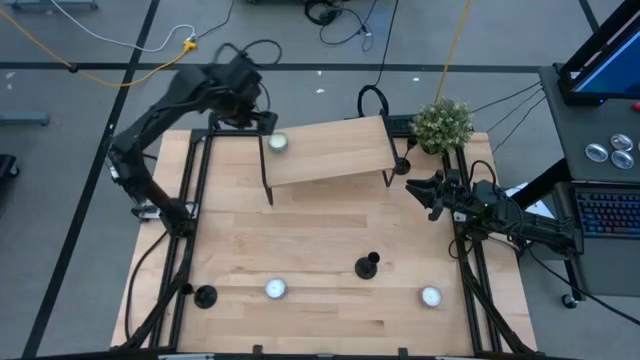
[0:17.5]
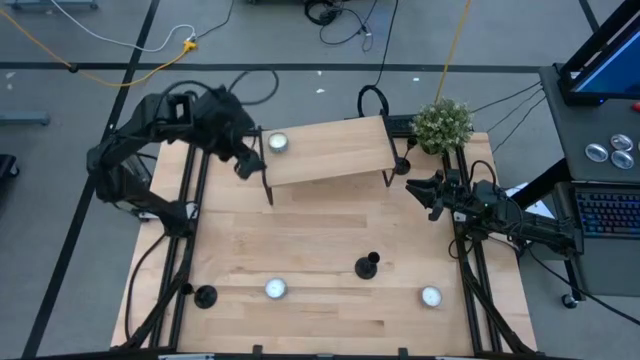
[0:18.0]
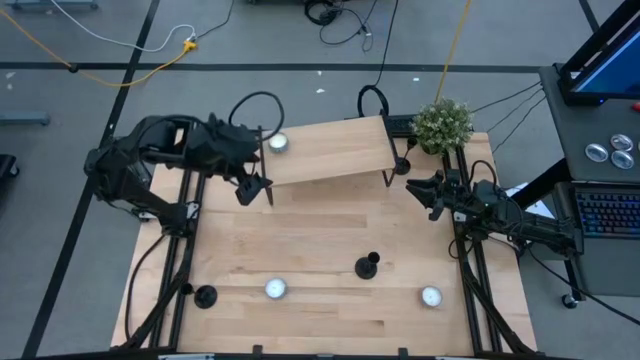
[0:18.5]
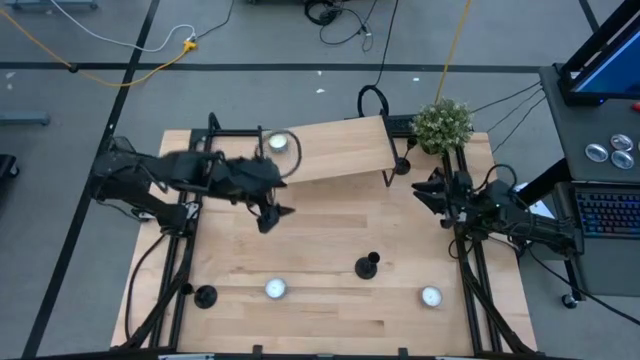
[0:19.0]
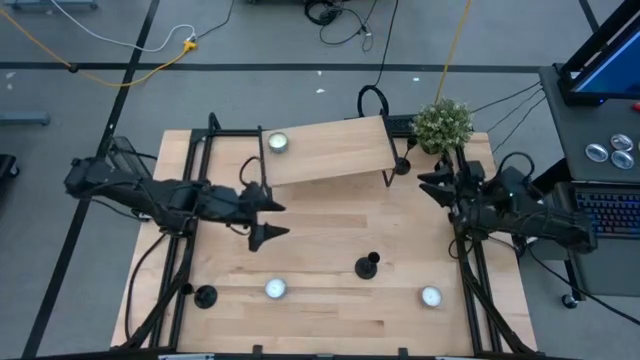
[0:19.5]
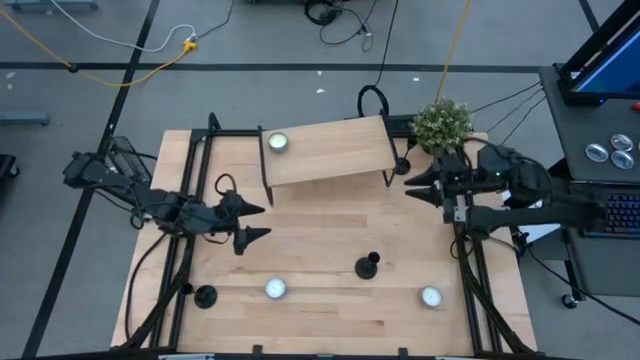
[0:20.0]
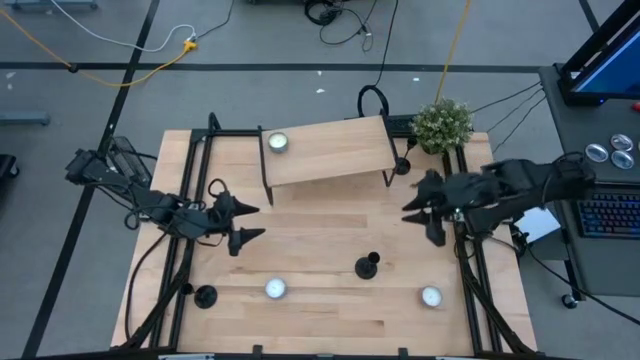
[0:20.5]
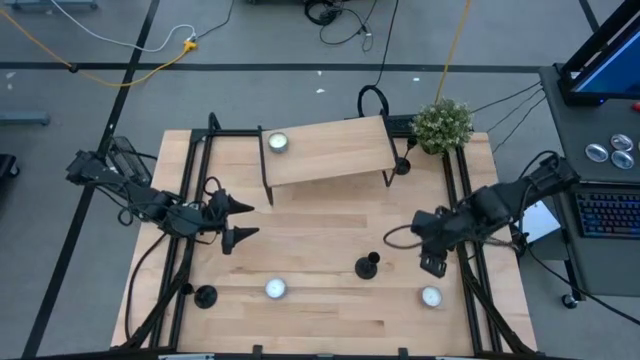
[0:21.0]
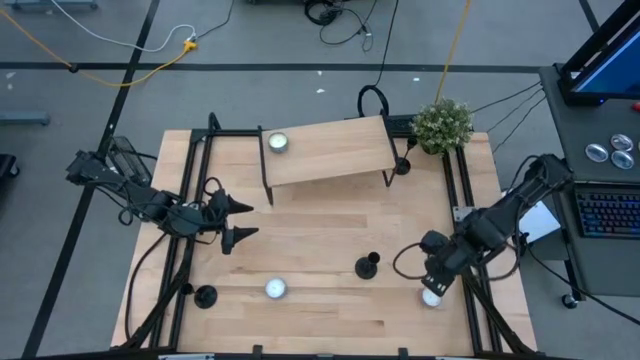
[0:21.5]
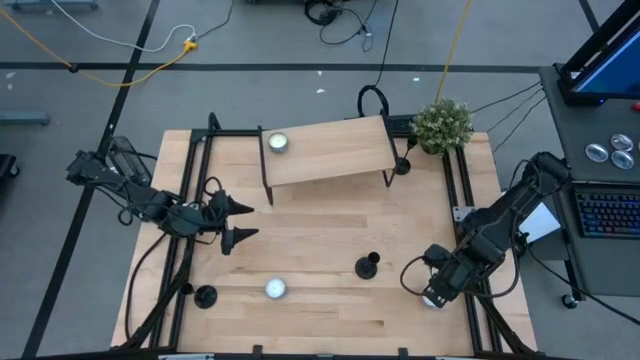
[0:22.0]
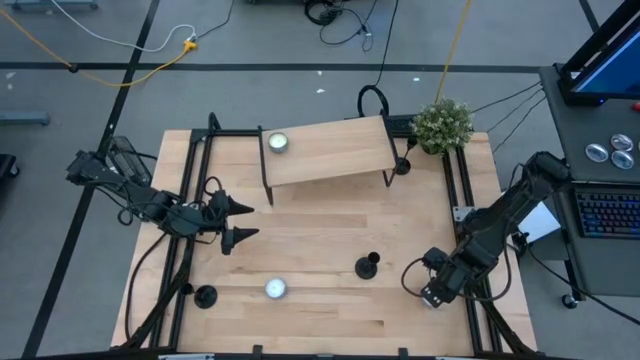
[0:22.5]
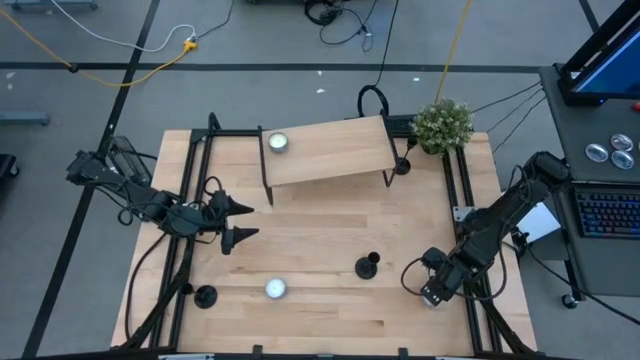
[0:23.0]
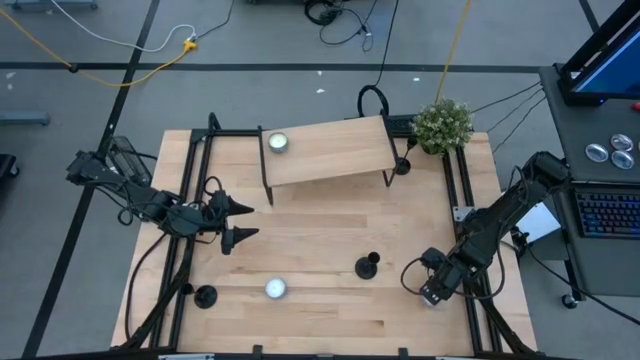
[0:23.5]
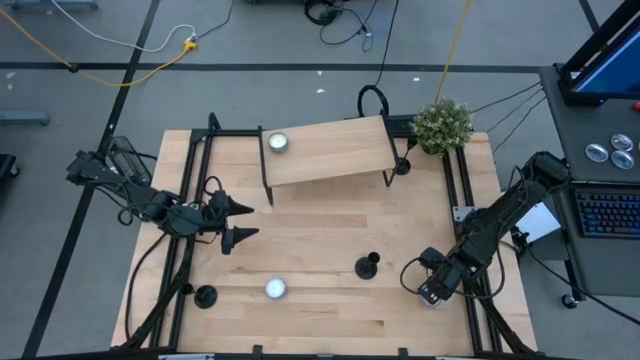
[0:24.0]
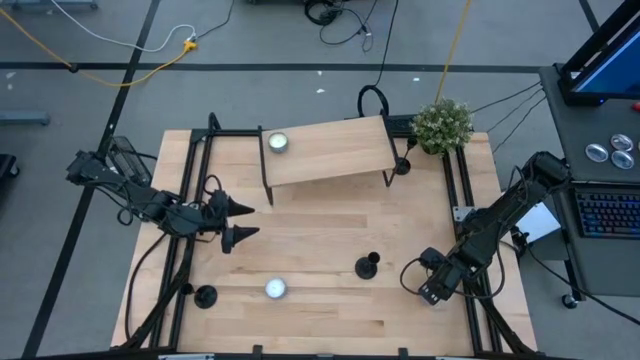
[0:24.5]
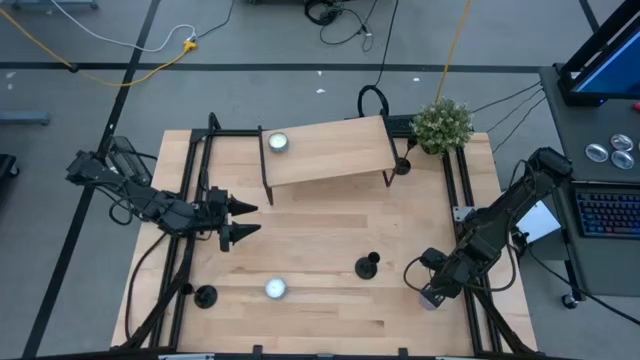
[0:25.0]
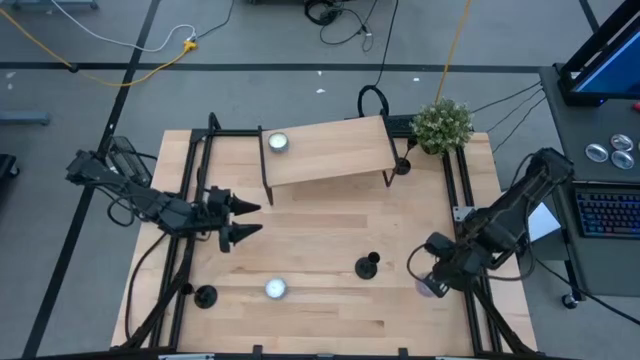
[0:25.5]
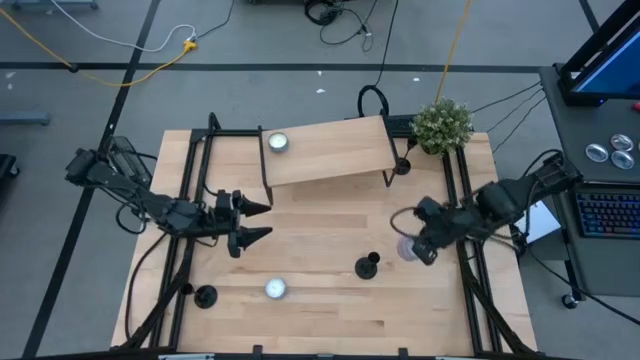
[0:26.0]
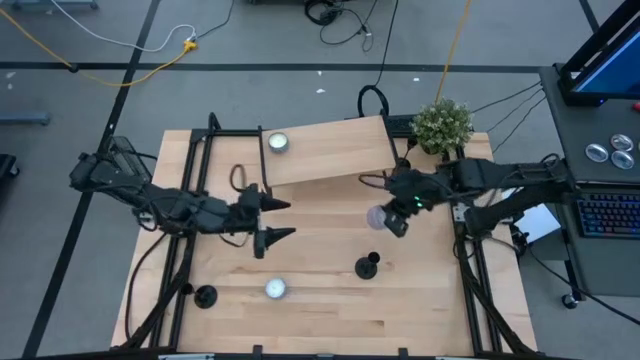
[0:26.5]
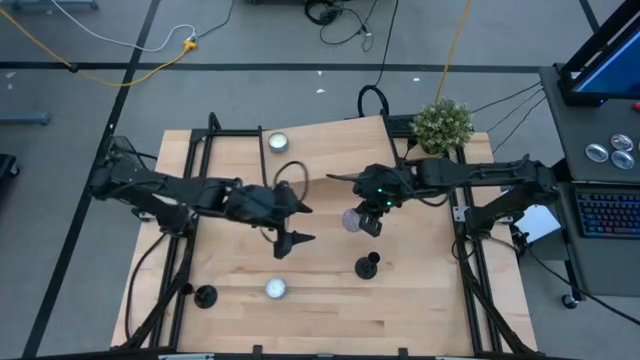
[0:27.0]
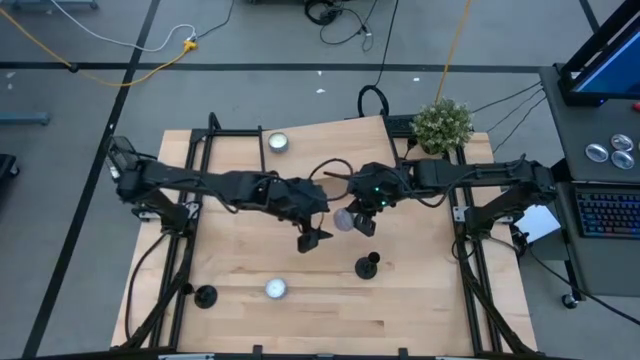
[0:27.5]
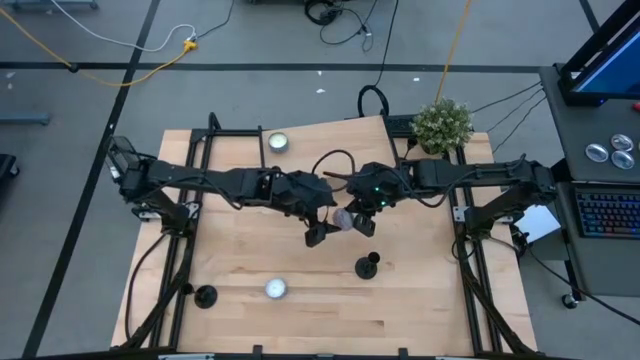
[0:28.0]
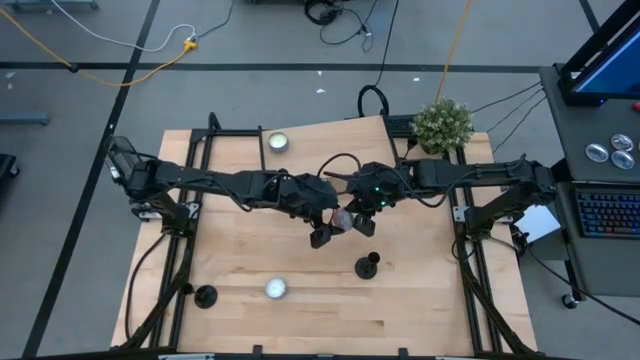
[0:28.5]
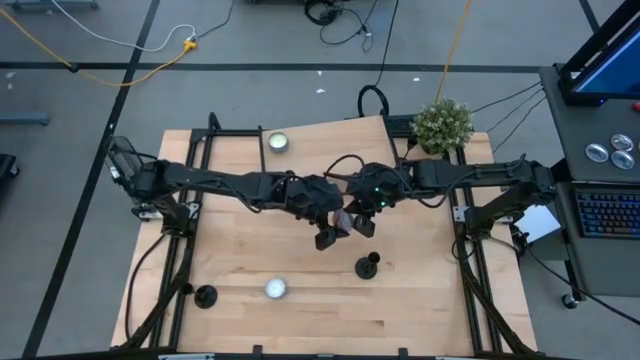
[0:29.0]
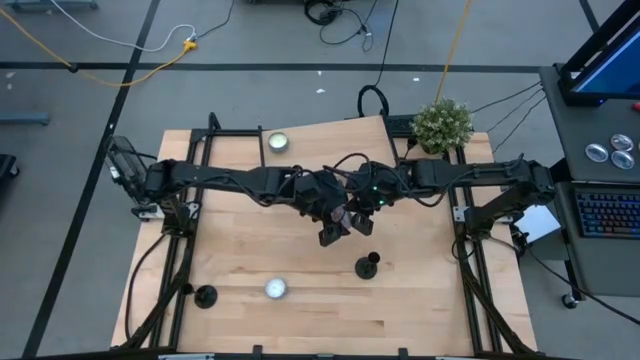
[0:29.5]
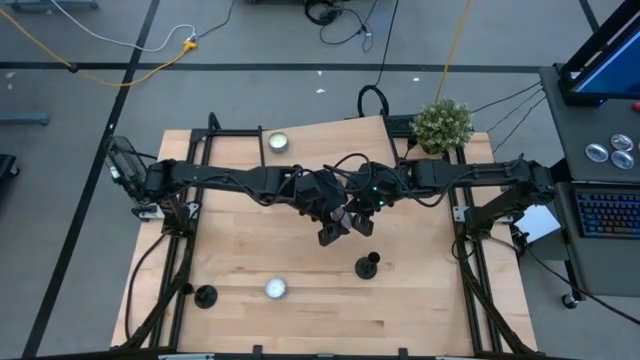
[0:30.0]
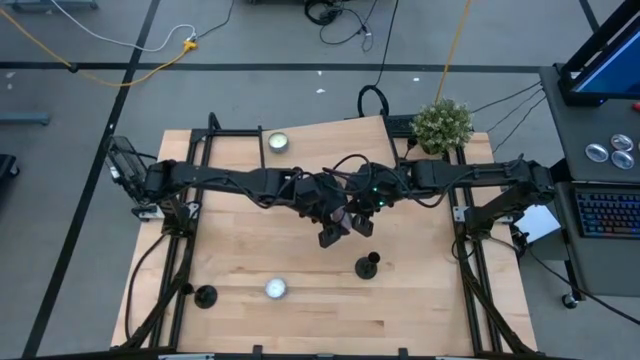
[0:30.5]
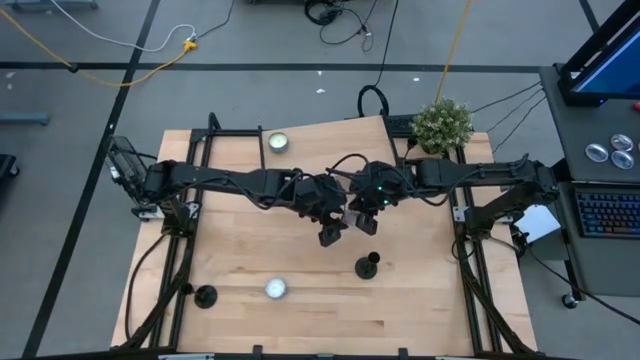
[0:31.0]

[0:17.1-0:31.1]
Task: Pick & Place candle stick holders
Put the pink patterned scented candle on the shelf

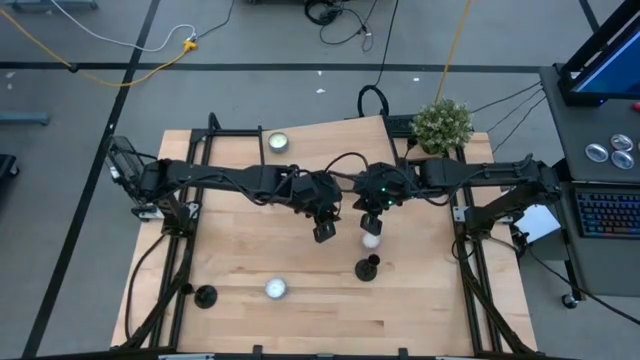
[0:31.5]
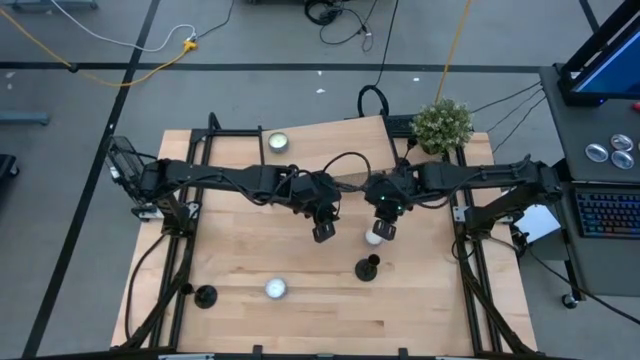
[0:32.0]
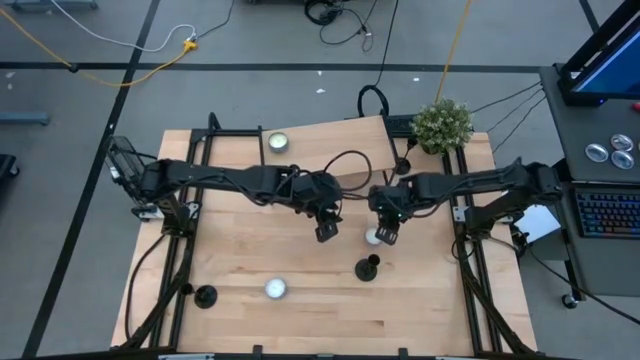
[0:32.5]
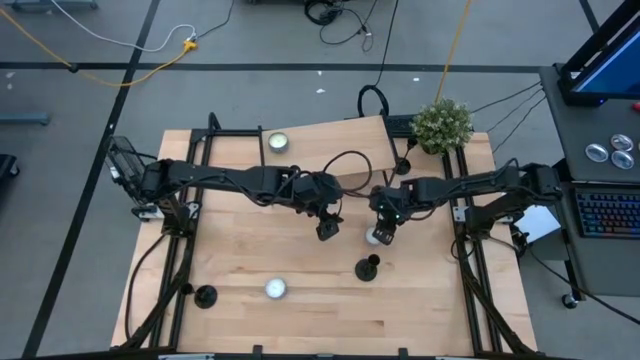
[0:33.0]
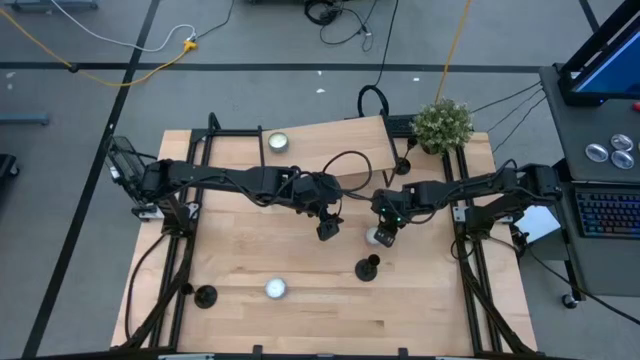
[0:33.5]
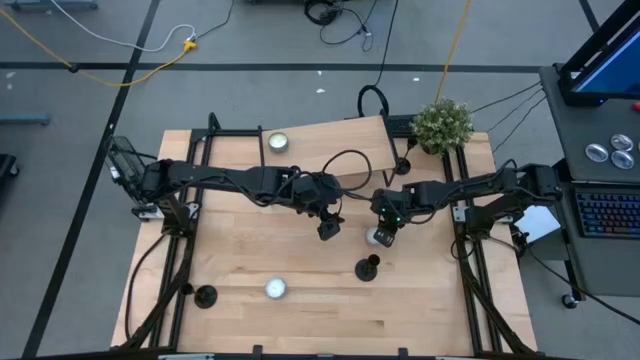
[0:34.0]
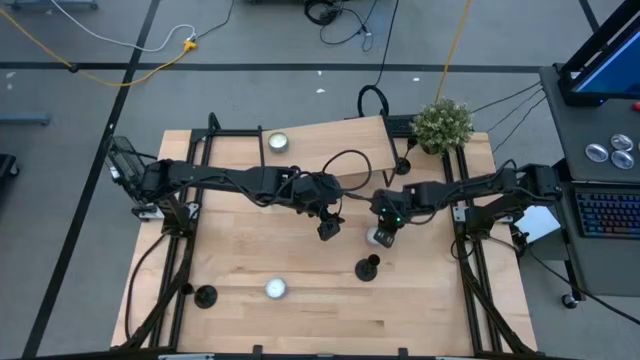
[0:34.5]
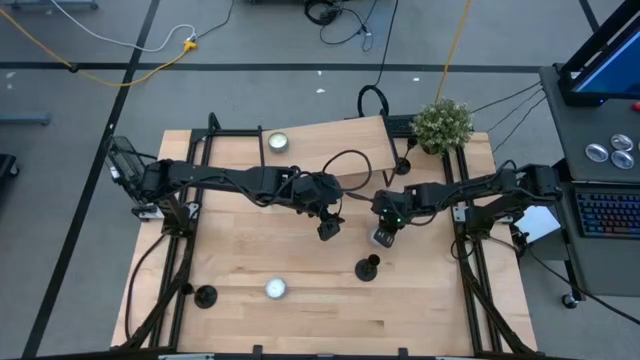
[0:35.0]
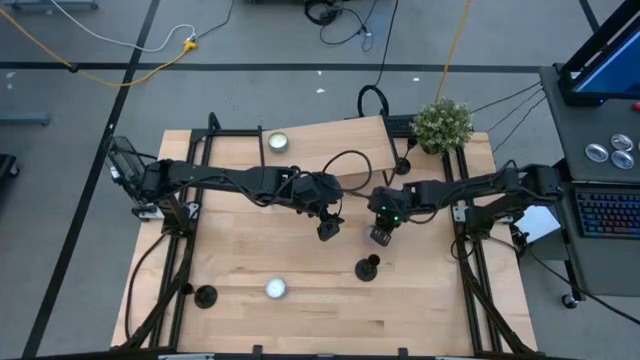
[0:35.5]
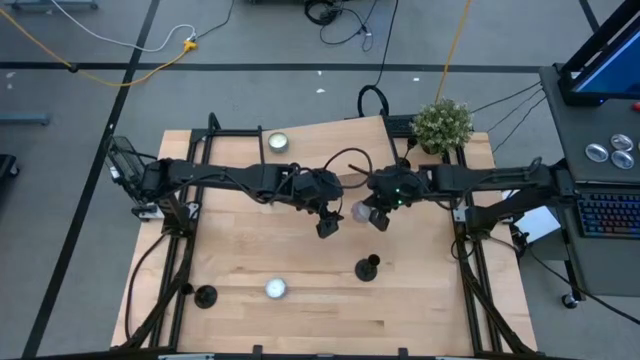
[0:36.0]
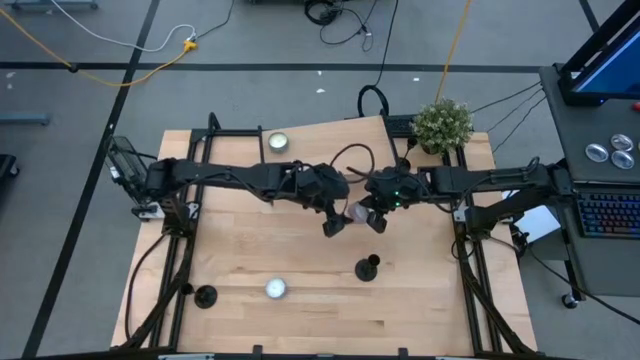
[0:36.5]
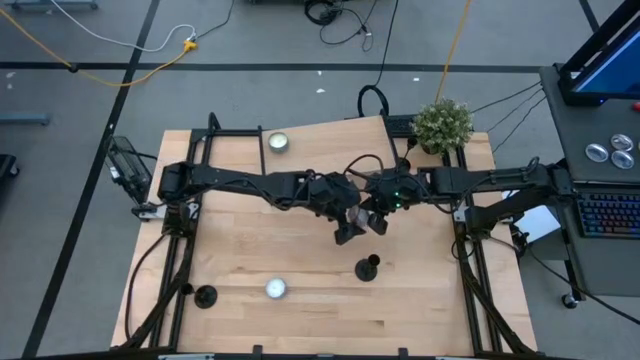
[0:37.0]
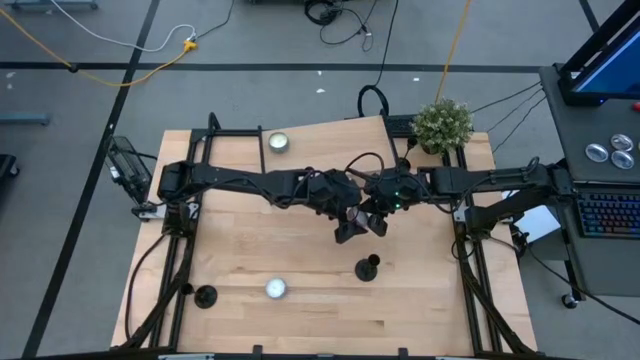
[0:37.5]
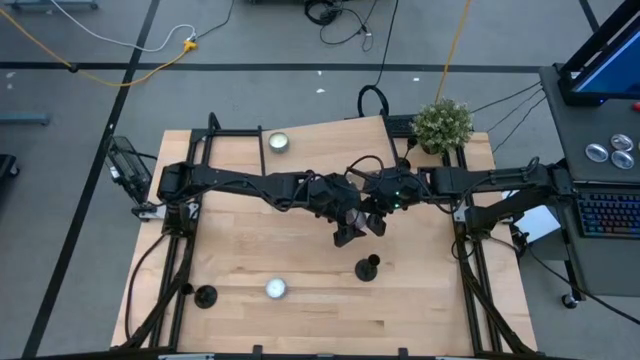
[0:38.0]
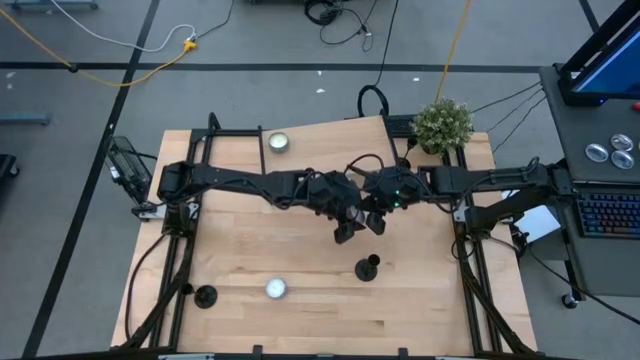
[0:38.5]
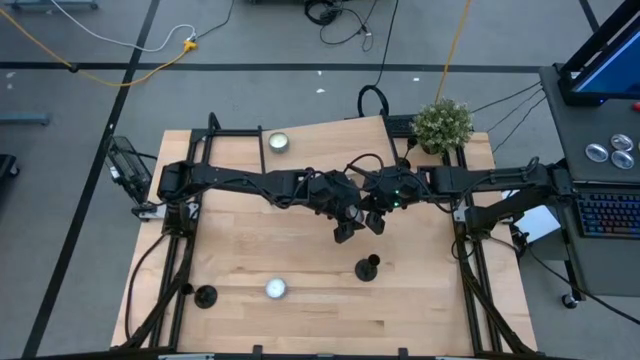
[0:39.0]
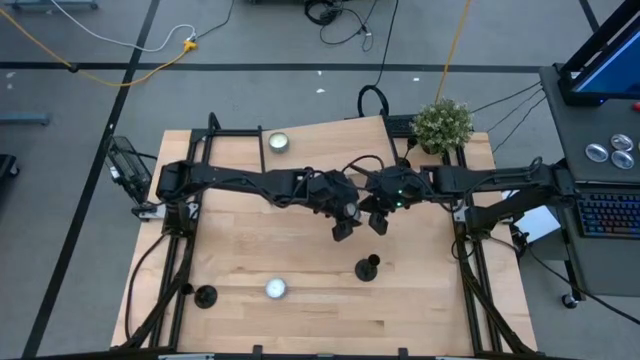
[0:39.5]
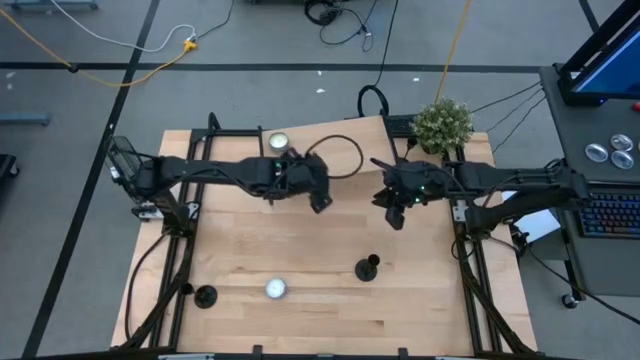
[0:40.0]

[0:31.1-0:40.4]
Put the pink patterned scented candle on the shelf
